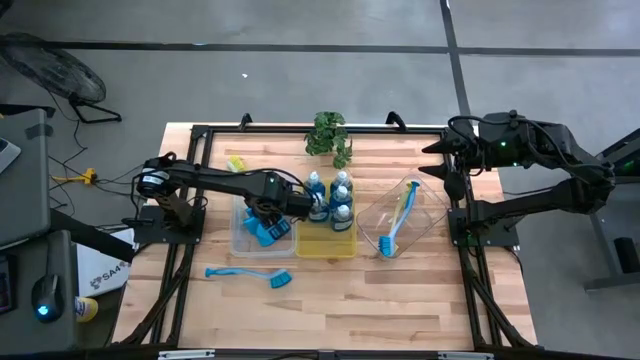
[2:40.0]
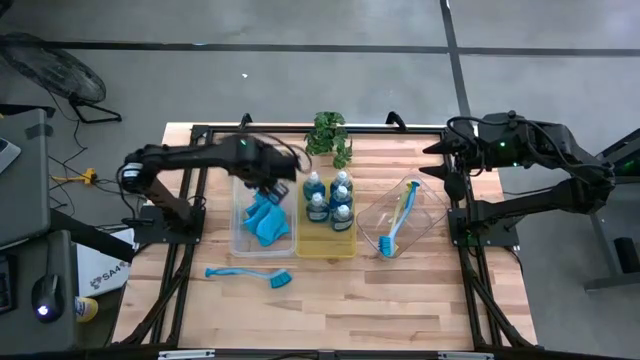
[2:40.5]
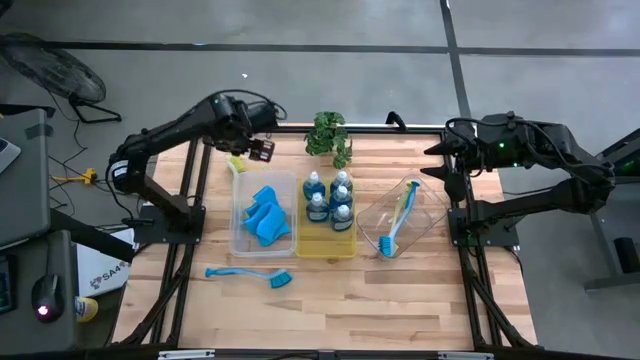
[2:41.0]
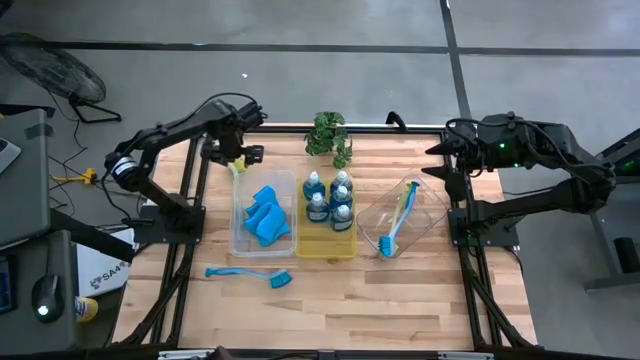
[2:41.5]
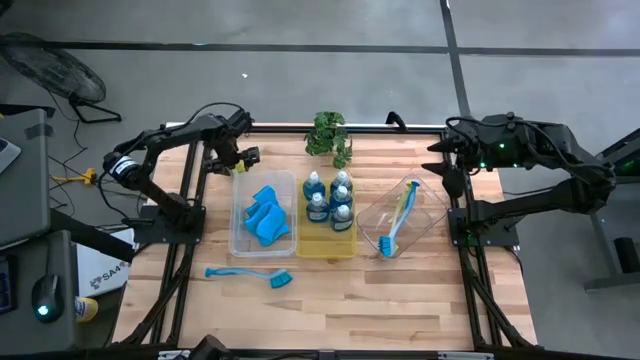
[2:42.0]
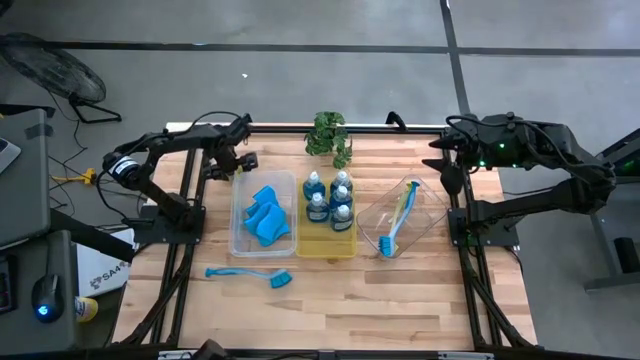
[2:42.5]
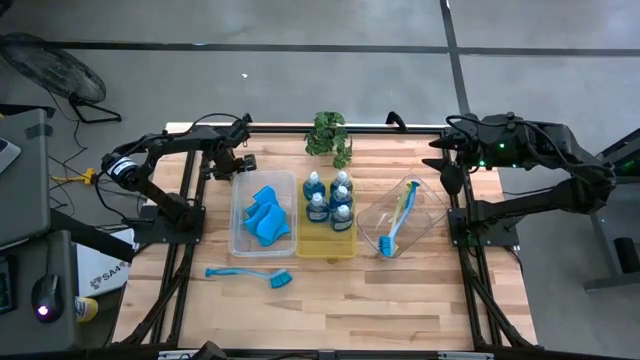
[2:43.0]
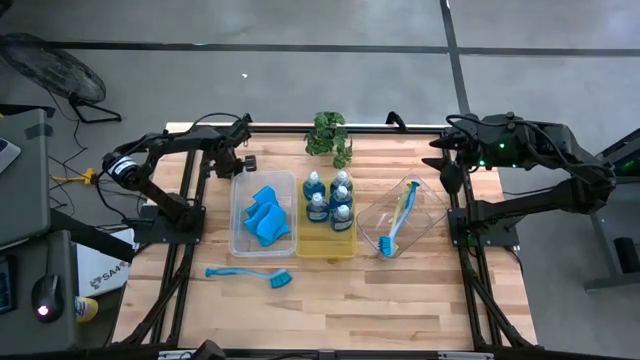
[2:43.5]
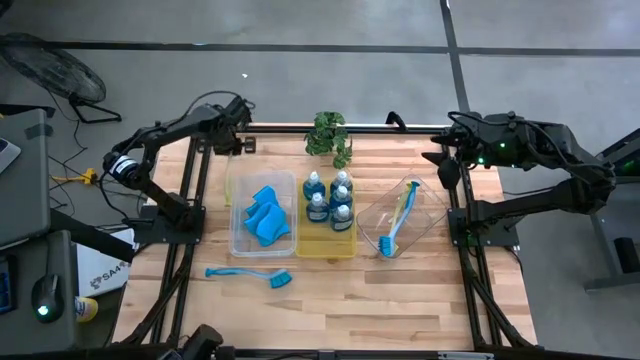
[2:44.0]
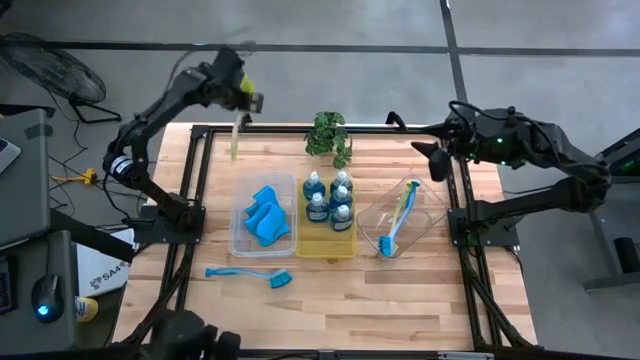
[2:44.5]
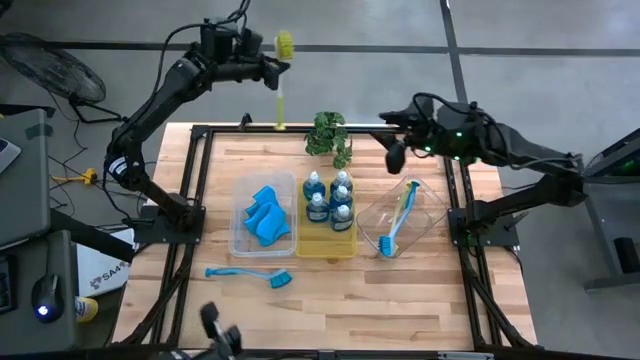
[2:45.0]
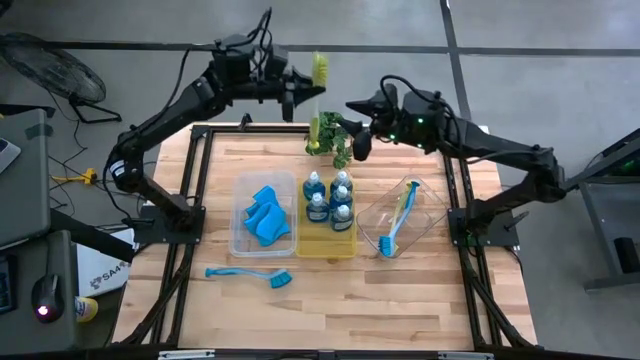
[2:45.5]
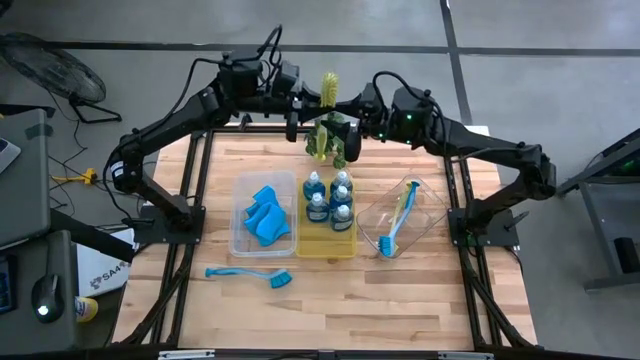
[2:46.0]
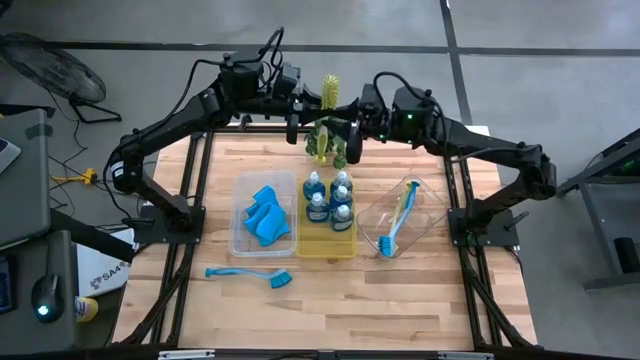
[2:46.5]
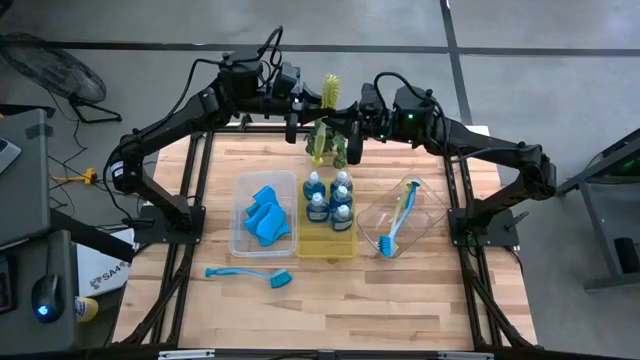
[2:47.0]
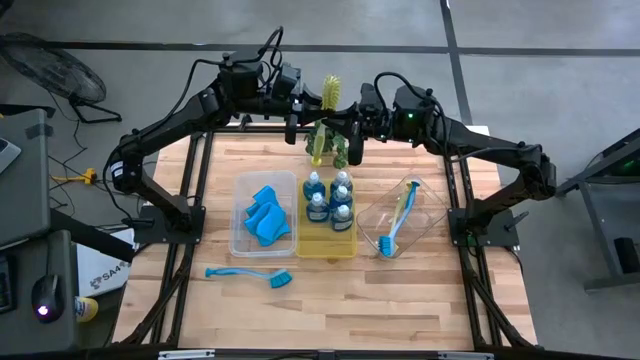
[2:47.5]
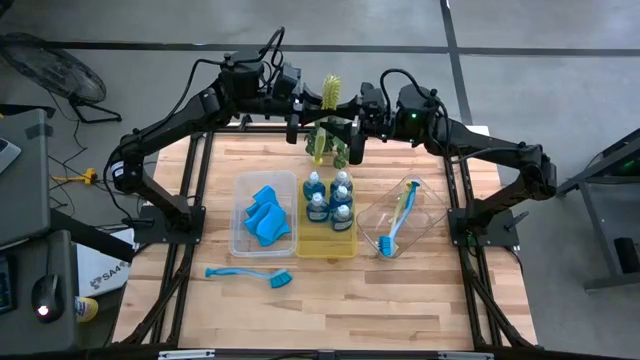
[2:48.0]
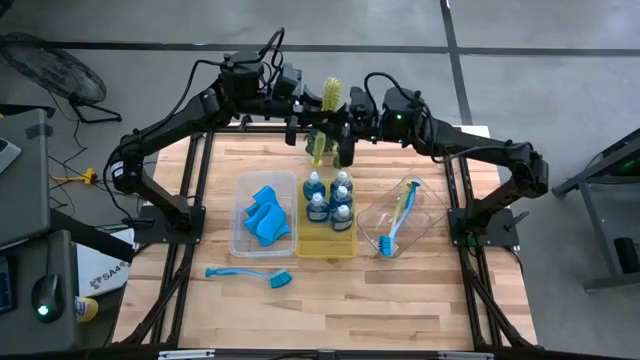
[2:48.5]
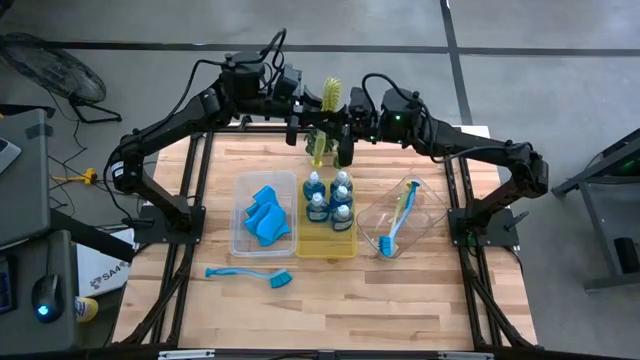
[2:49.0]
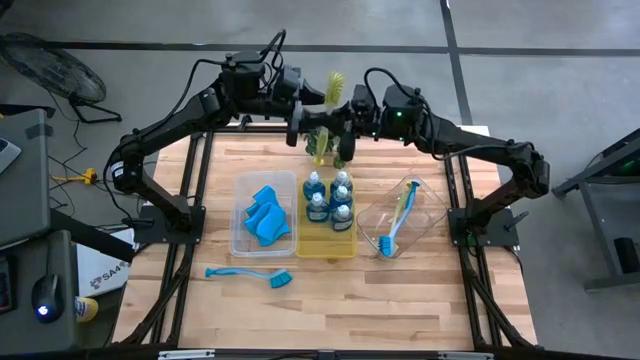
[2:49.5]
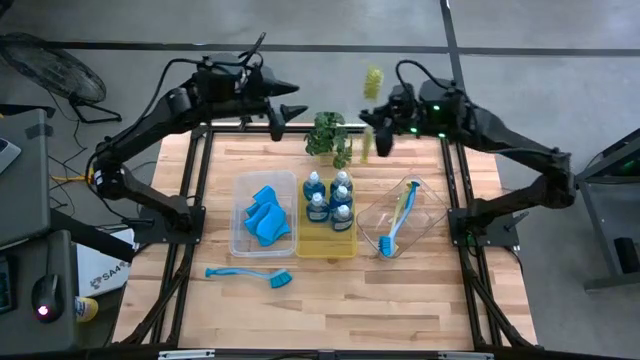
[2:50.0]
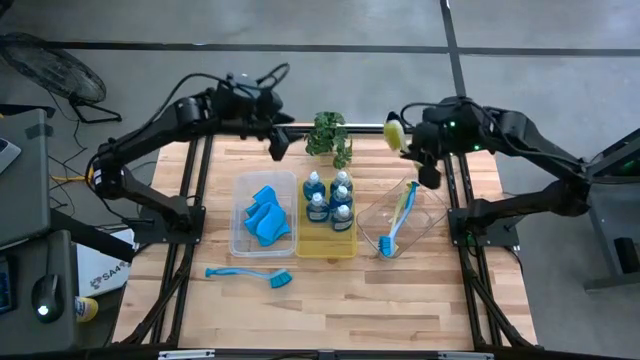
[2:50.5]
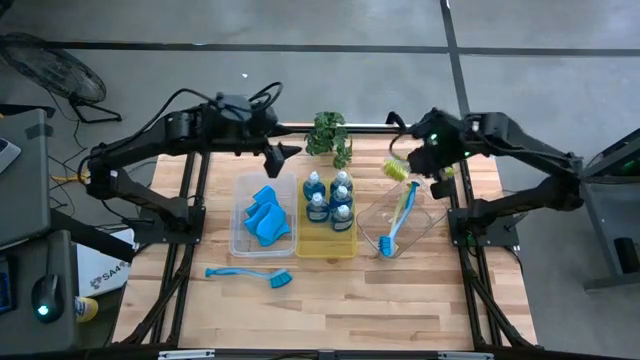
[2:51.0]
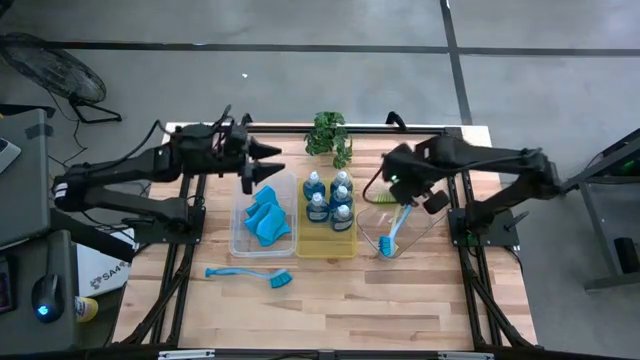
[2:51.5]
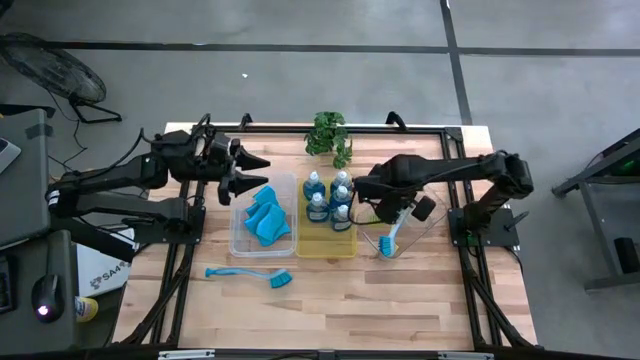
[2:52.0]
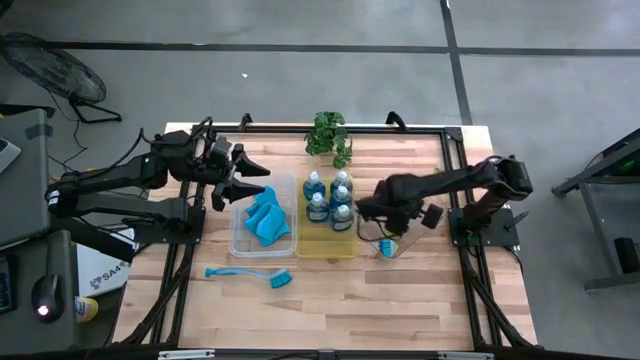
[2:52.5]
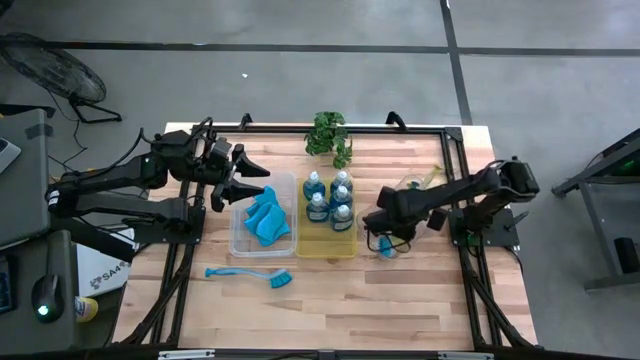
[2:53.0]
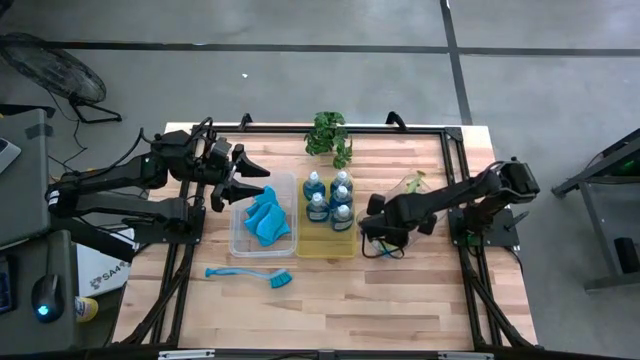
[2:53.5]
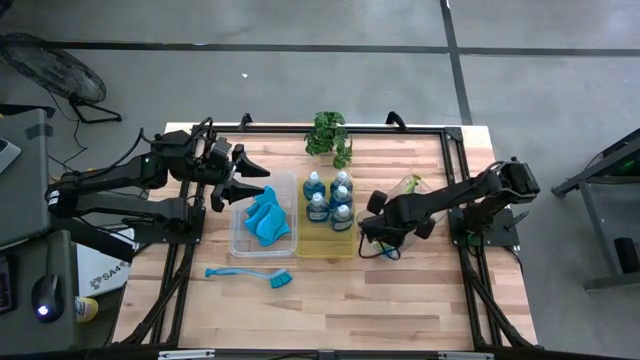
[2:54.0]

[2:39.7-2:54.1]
Task: Pick & Place Kitchen Sink Supplies
Put the yellow toilet brush into the transparent bin

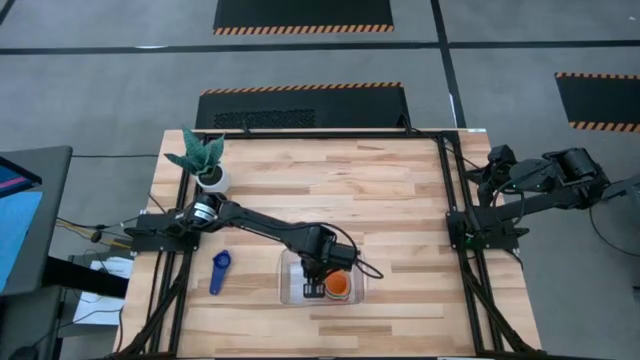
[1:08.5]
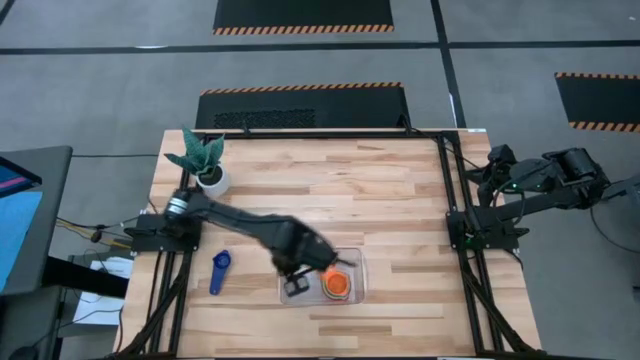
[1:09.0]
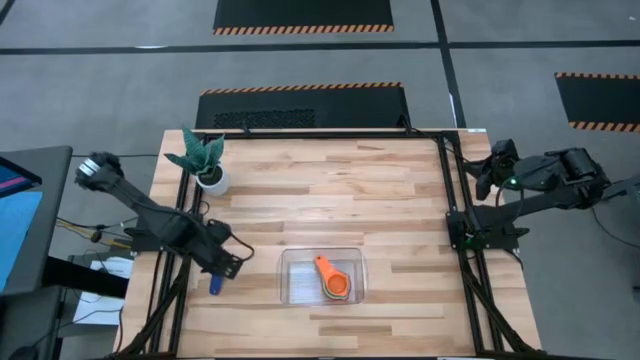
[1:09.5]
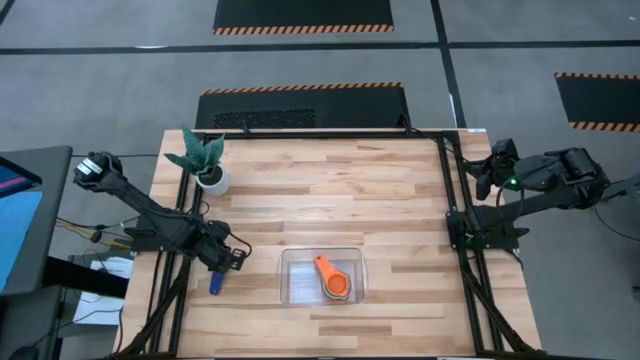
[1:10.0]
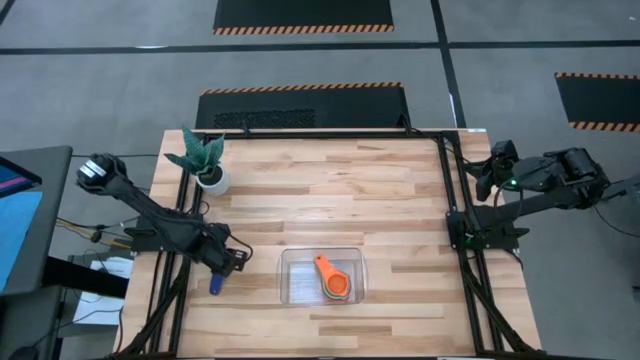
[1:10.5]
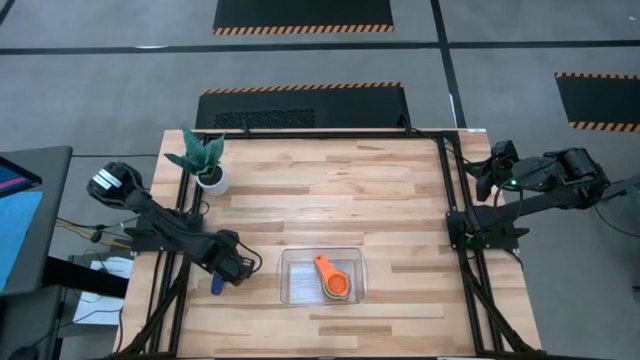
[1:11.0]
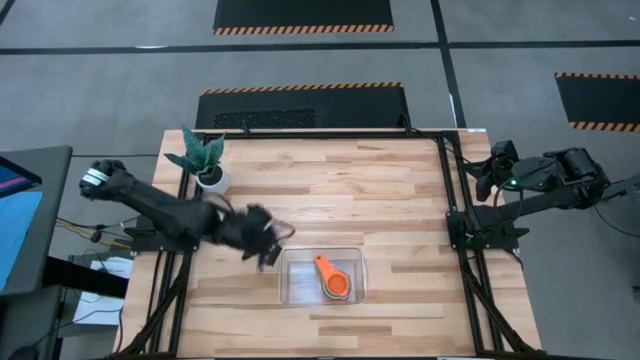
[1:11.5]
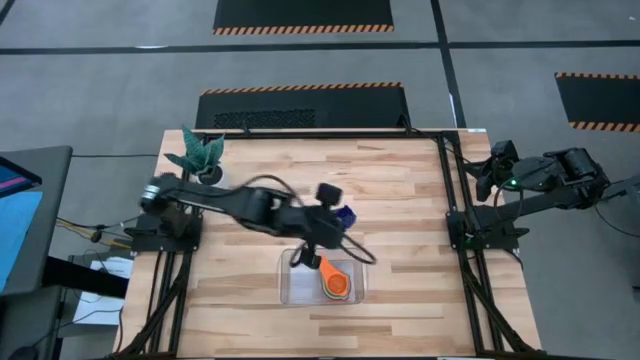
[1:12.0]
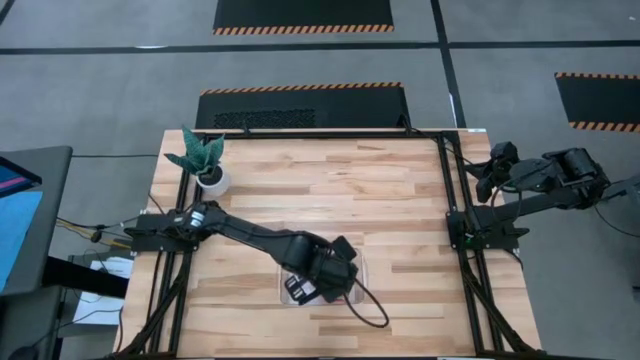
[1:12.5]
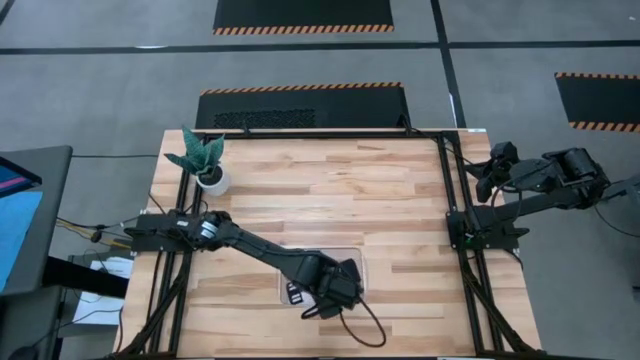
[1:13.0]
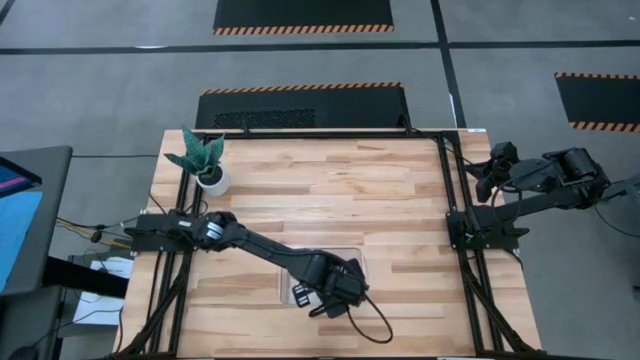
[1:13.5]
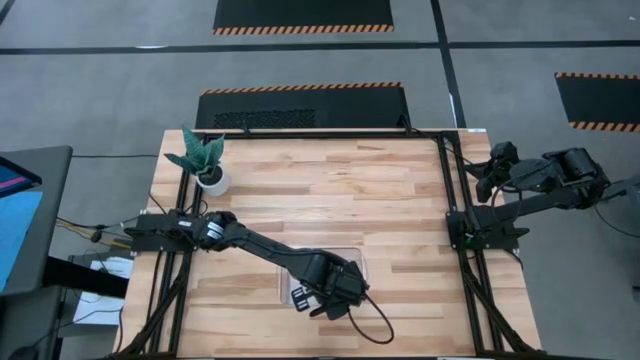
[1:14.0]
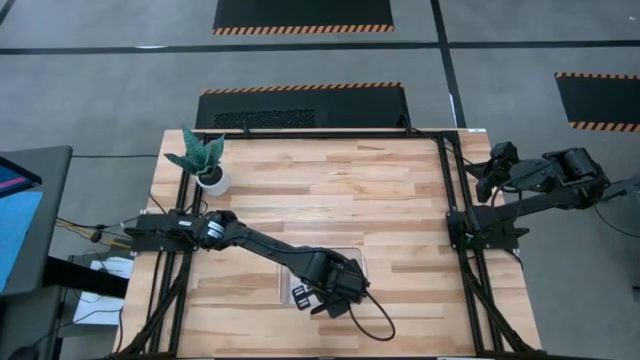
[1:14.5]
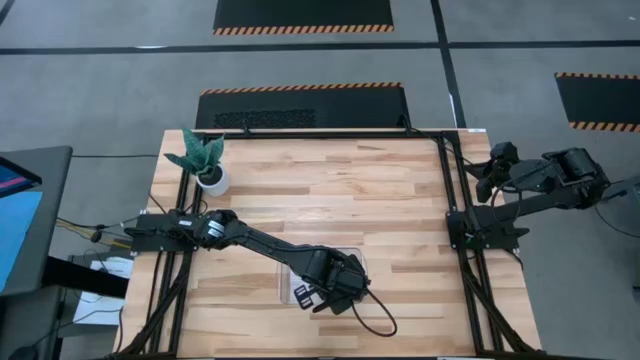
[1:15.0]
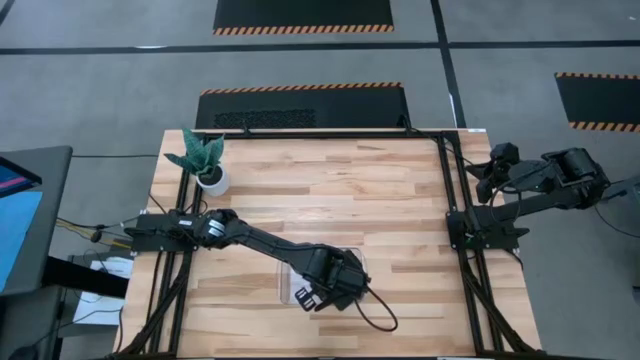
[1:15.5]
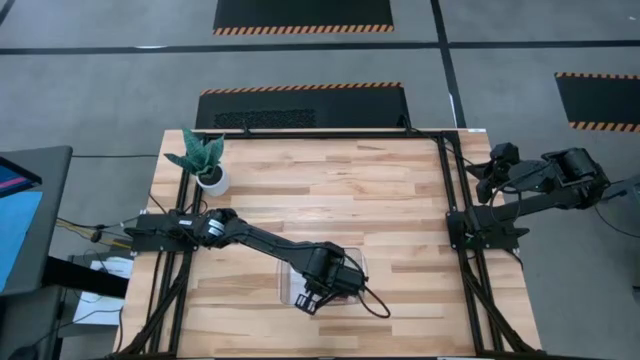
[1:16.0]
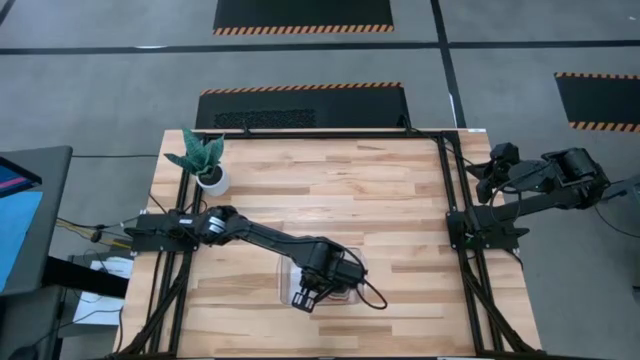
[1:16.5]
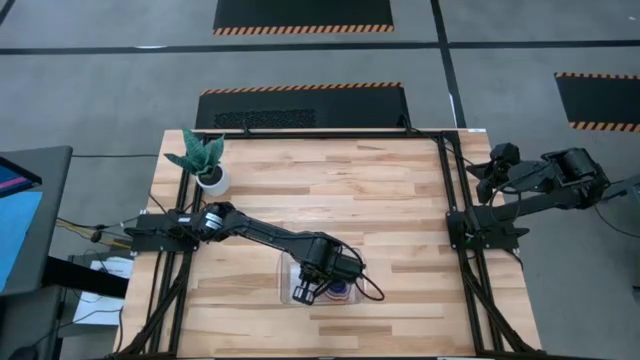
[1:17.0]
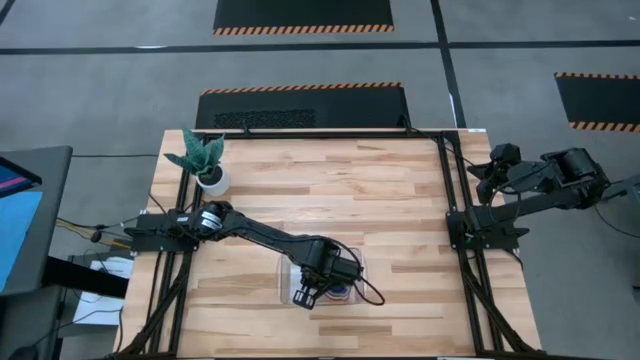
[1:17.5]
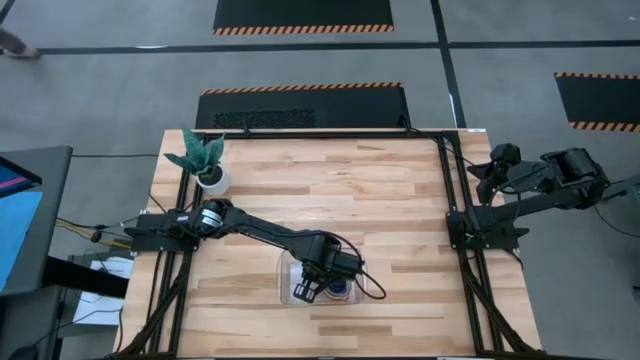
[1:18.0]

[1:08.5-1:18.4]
Task: Nest measuring cups in basket
Stack the dark blue measuring cup on top of the orange measuring cup in the transparent bin
